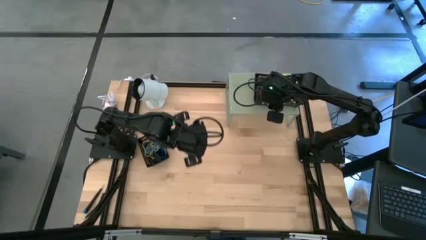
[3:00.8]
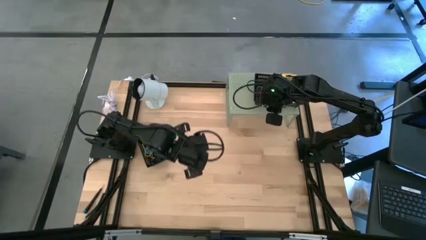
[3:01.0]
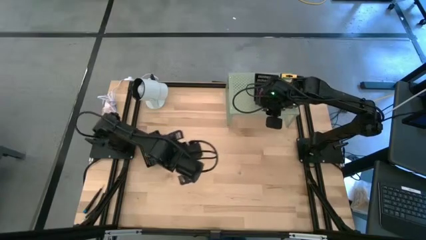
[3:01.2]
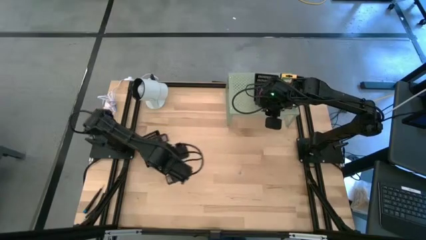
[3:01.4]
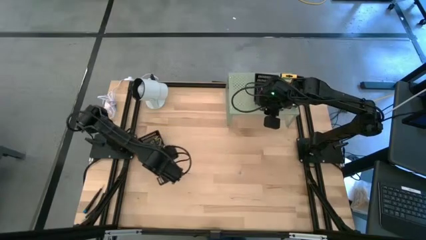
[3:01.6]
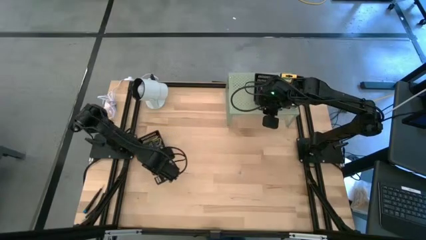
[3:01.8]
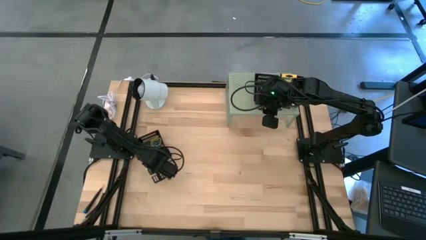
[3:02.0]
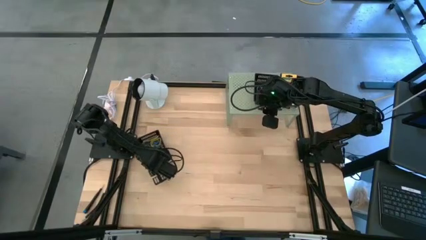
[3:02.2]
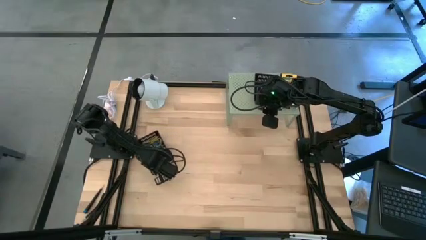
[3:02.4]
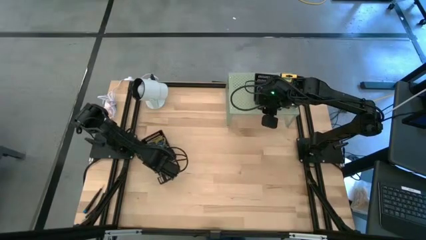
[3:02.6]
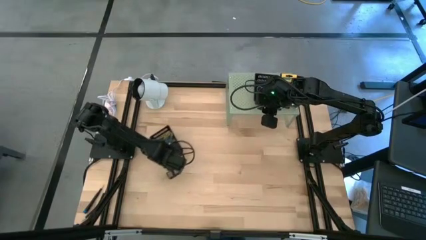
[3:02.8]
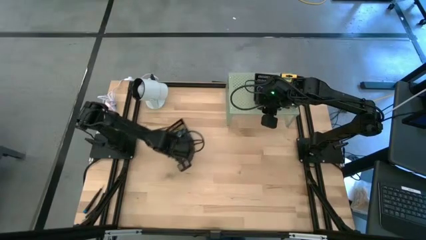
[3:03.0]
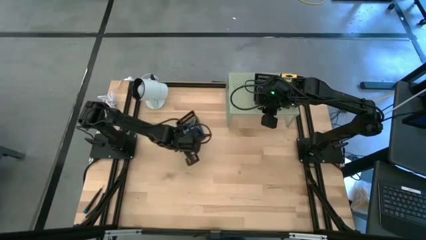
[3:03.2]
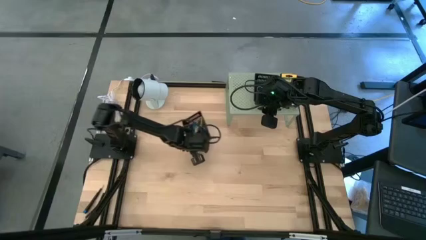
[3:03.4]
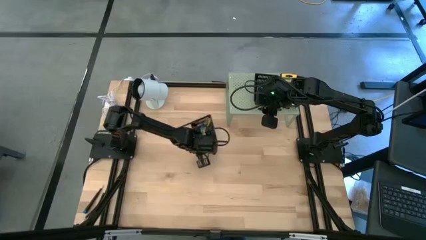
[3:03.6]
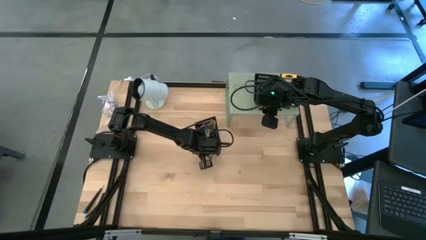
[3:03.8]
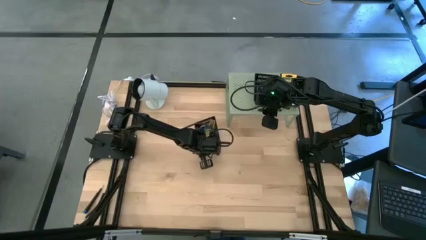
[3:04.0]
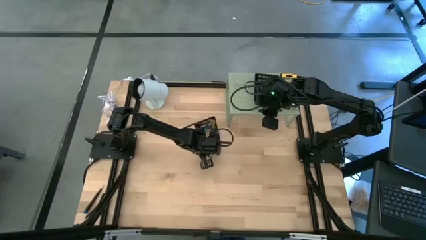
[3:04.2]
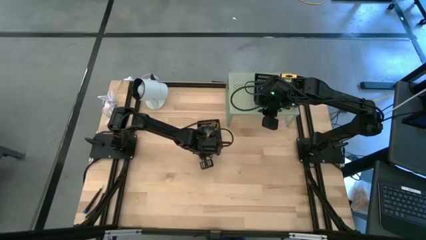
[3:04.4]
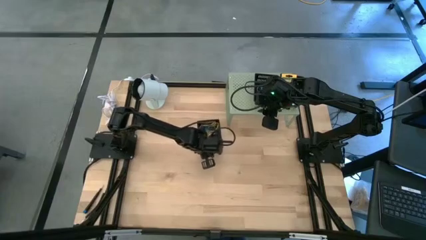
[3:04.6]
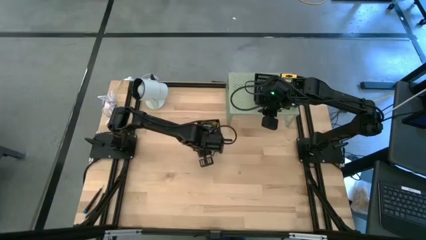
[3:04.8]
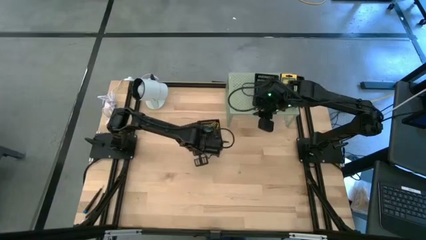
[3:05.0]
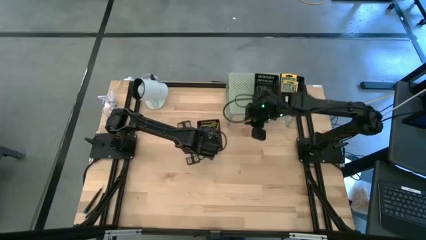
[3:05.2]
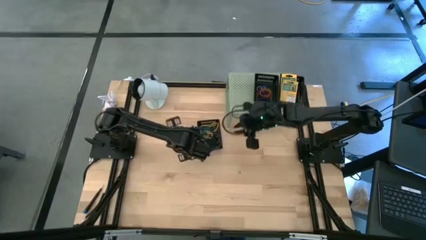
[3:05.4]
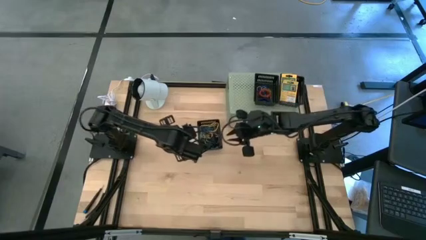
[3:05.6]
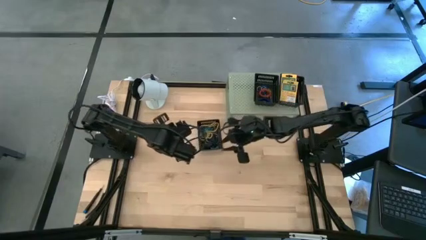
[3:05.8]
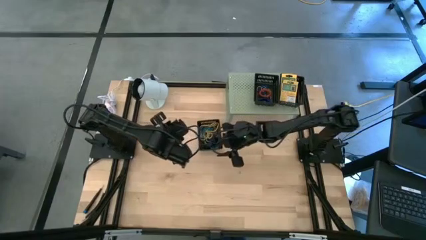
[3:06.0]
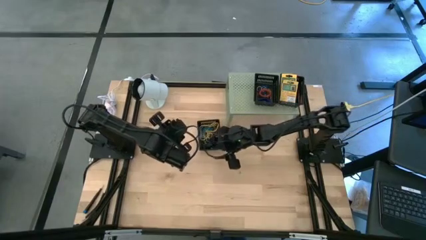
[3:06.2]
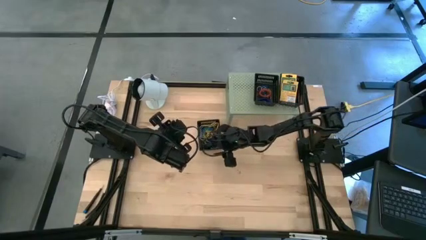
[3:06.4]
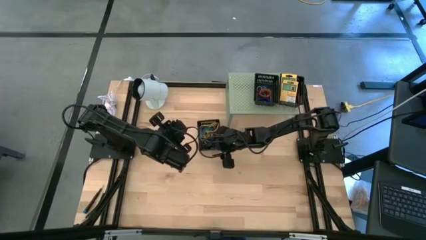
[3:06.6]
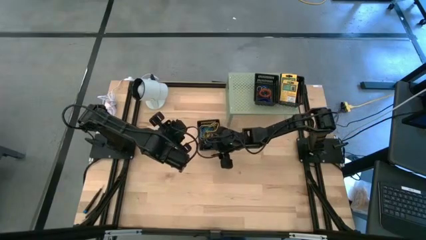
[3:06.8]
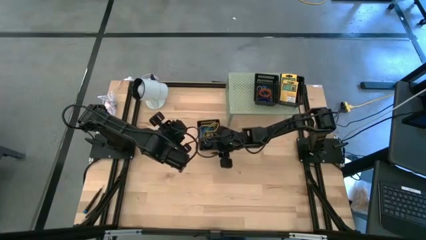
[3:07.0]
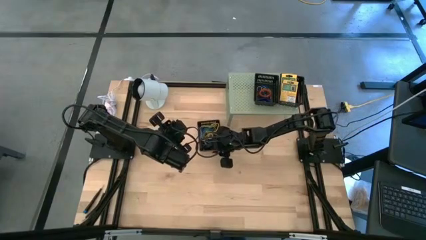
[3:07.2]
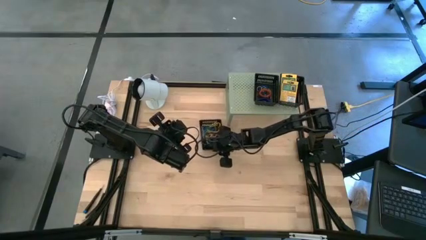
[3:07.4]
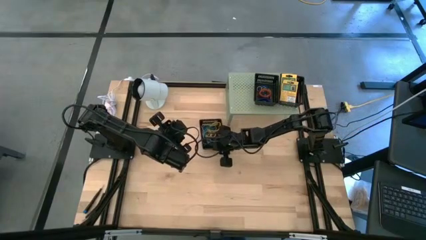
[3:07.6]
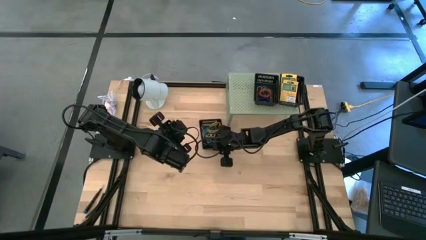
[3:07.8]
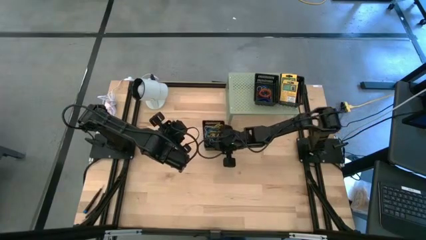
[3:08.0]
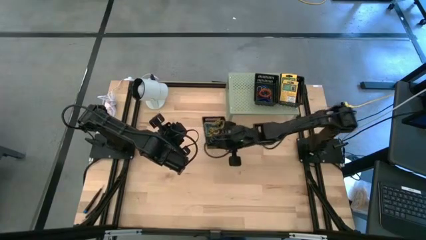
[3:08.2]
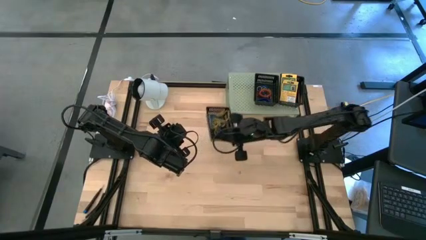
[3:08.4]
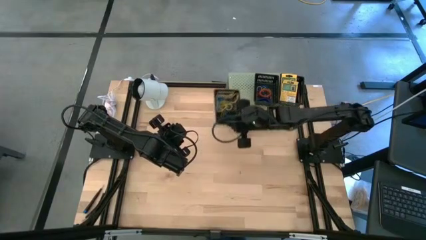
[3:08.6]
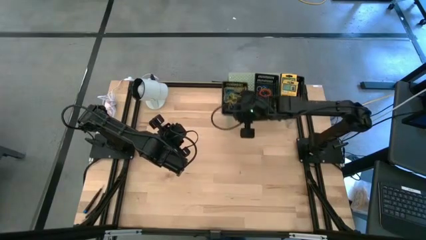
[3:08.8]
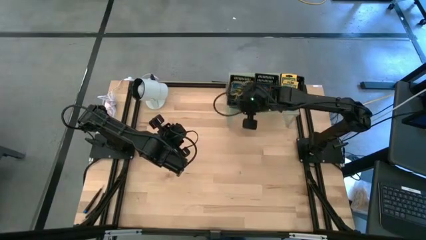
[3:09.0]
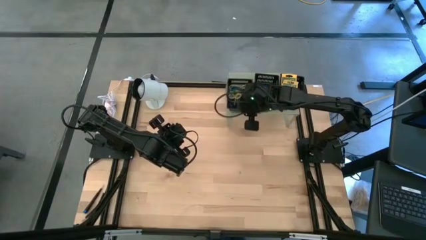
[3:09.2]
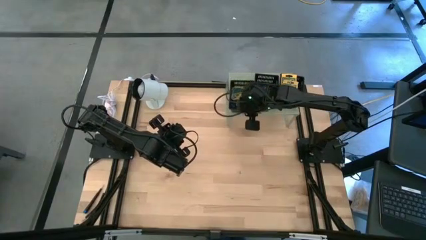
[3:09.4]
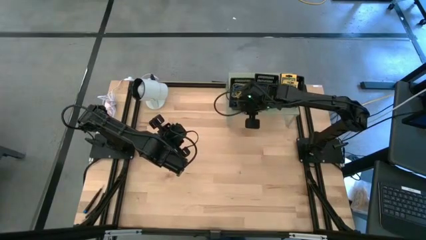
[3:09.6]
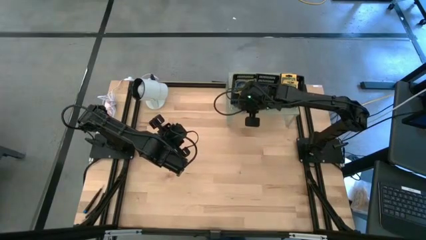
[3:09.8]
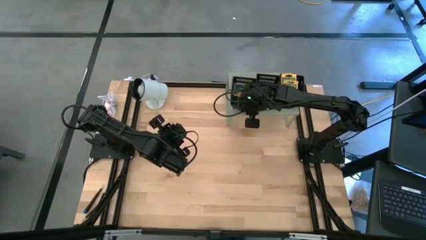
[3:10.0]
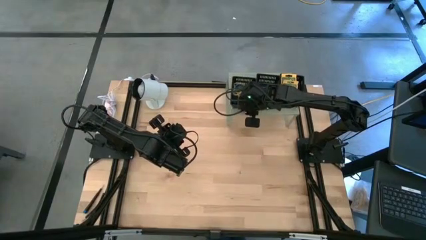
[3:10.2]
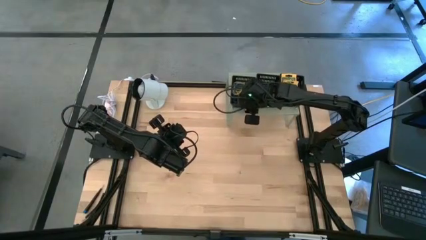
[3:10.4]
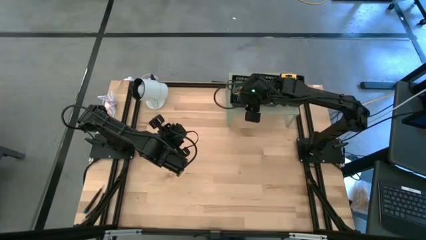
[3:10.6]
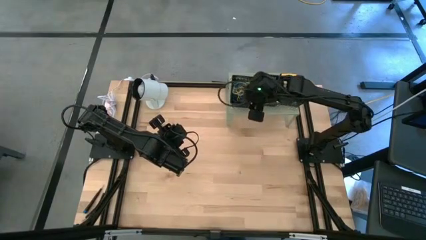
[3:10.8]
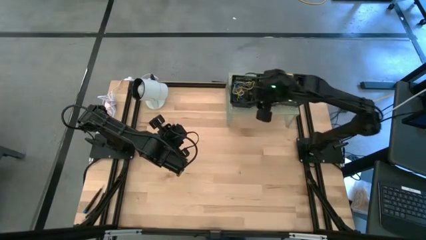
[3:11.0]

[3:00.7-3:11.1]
Task: Pick & Place Office Desk Supplies
Put the black basket on the shelf

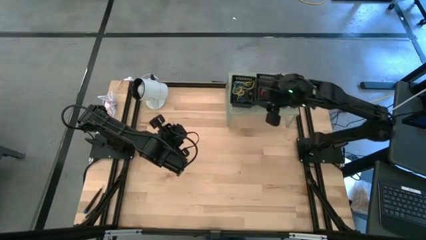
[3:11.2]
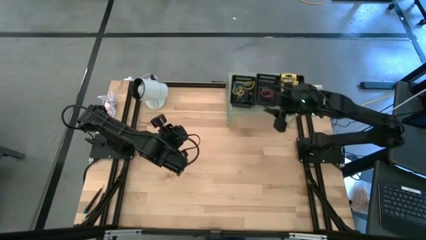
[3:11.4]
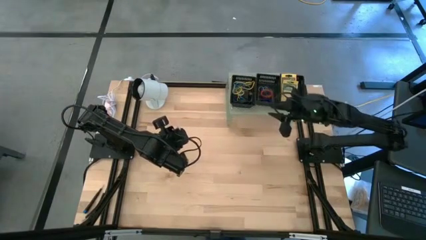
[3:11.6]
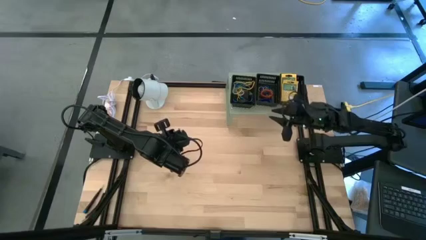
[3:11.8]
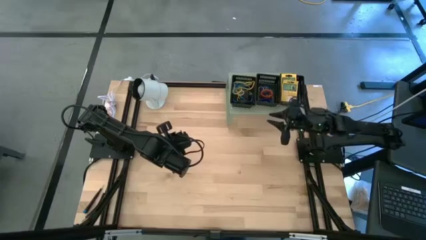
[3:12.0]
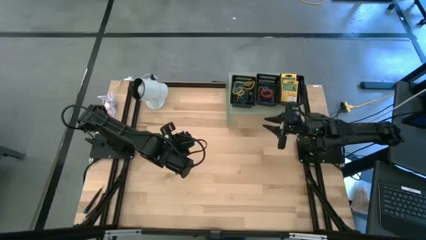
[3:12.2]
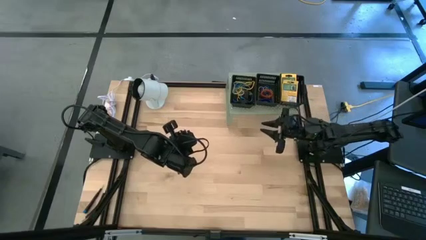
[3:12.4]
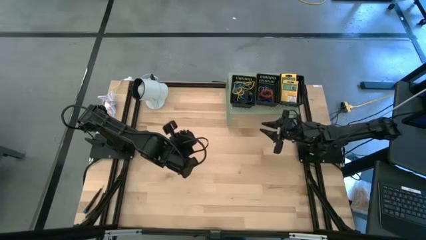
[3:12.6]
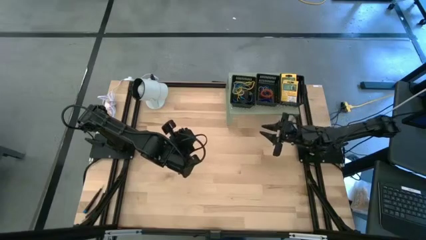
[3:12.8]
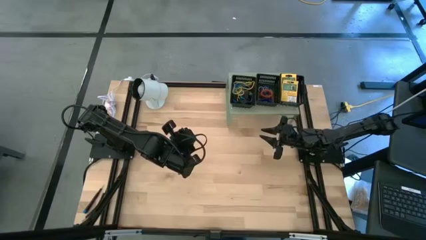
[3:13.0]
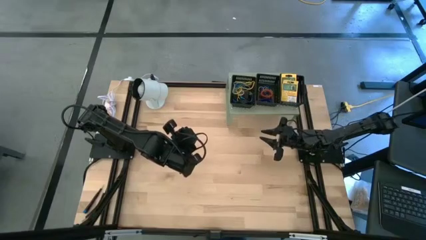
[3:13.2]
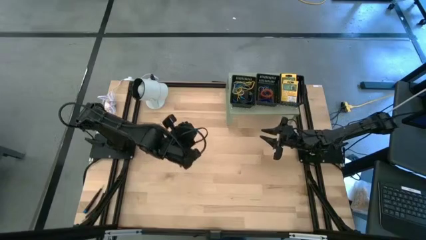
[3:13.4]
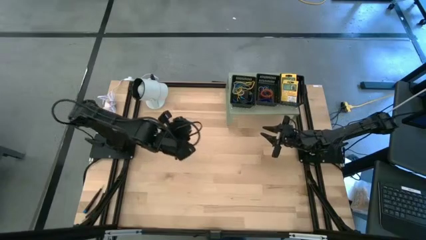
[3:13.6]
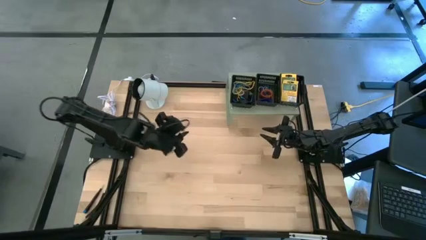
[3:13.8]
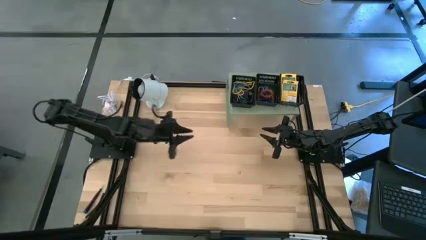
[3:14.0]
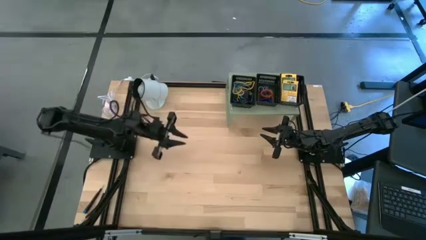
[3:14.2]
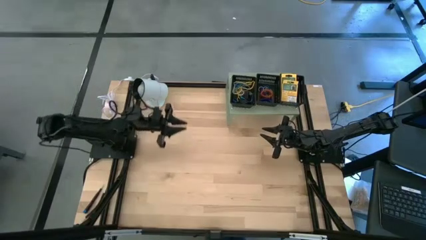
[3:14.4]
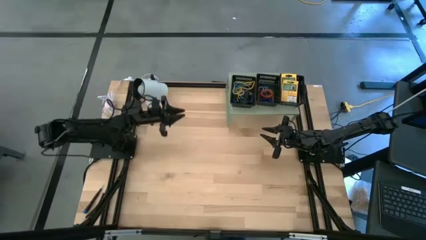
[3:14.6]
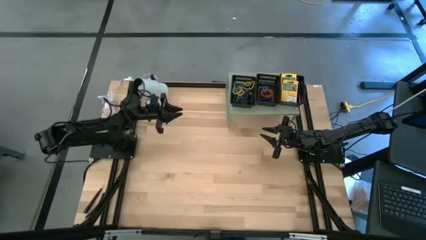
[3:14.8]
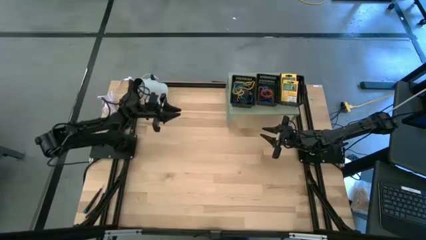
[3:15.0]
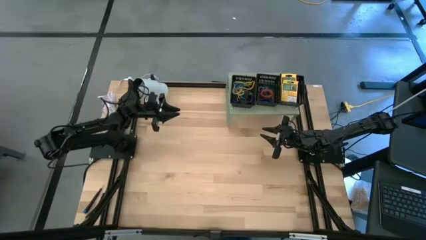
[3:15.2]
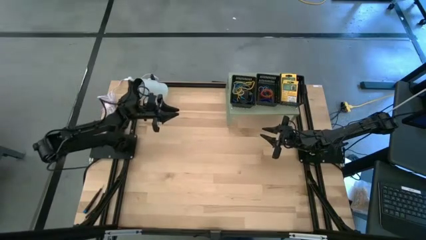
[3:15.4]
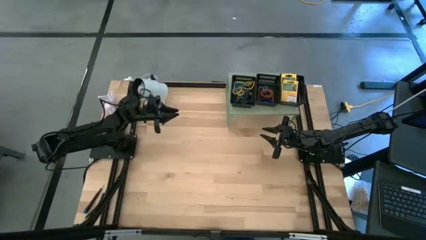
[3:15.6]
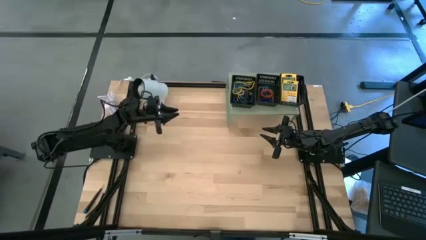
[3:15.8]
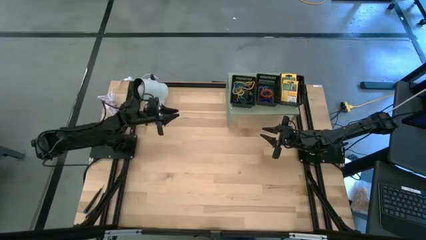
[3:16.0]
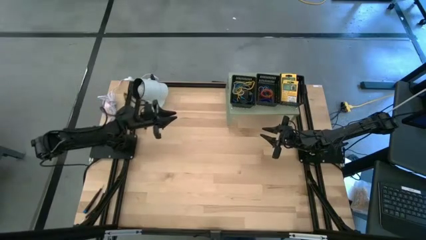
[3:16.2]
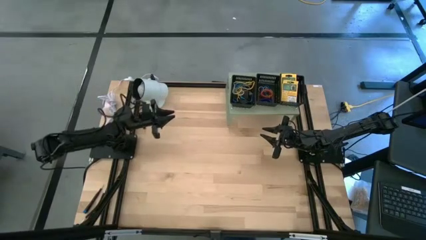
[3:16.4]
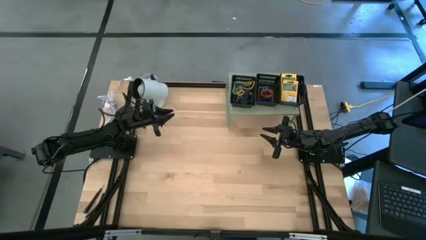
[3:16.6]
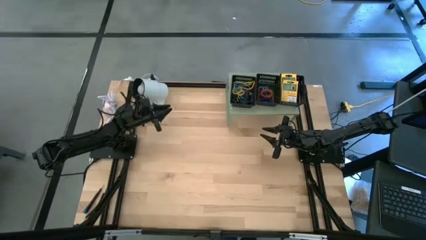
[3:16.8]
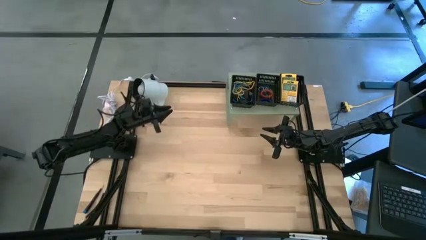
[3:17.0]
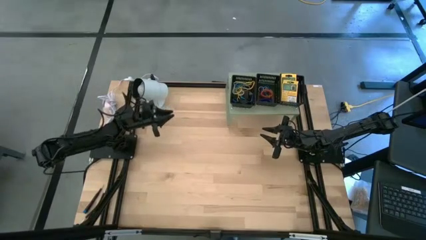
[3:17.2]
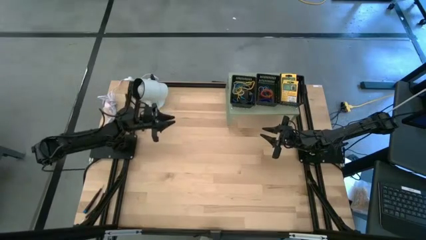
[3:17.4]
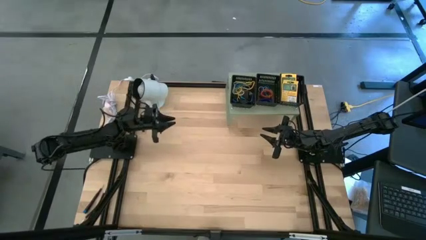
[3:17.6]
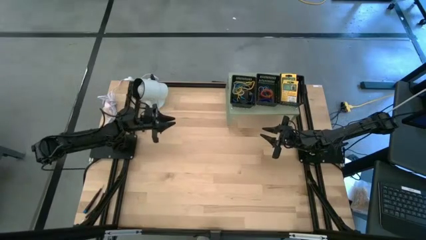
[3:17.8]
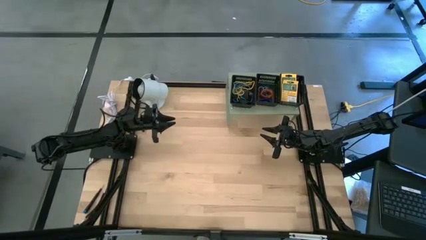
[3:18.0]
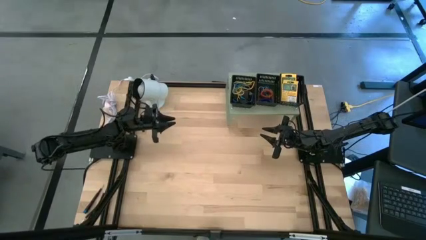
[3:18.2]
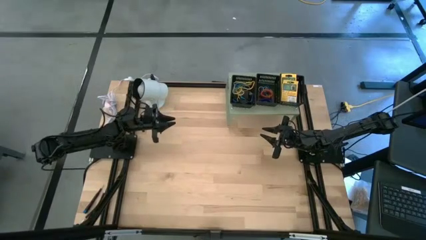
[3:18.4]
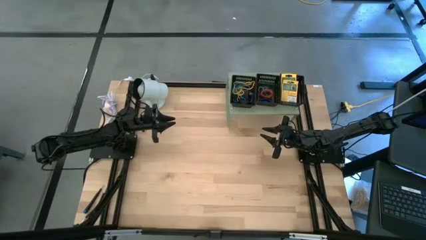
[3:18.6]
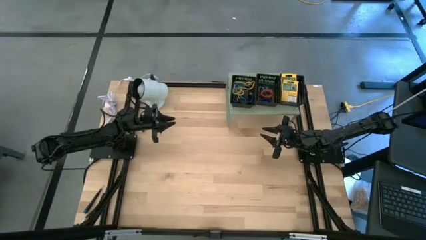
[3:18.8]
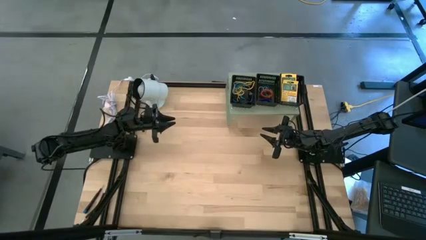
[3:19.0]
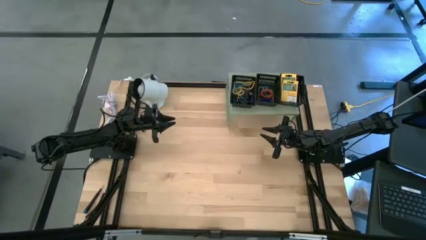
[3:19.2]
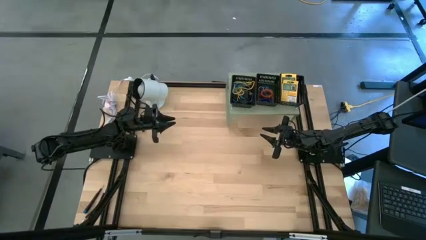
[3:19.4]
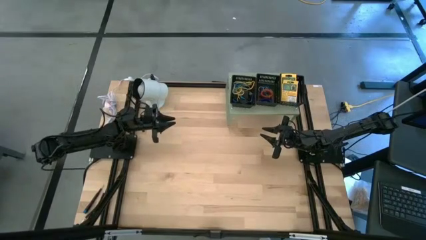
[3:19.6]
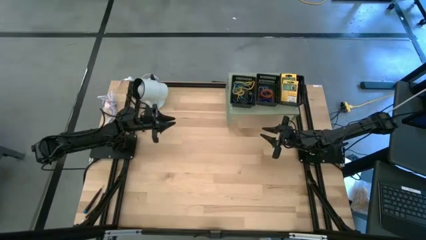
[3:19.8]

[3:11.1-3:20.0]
Return to Home Position
